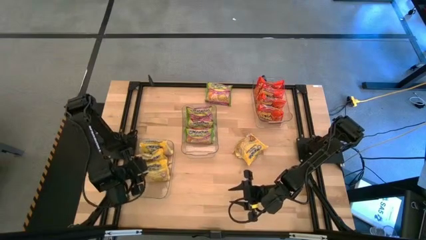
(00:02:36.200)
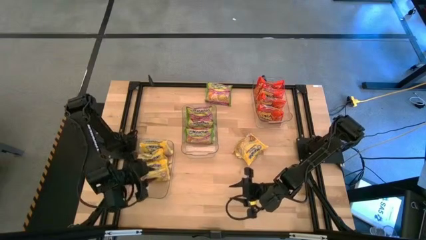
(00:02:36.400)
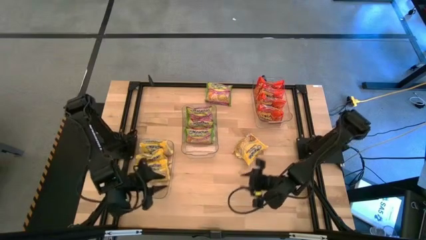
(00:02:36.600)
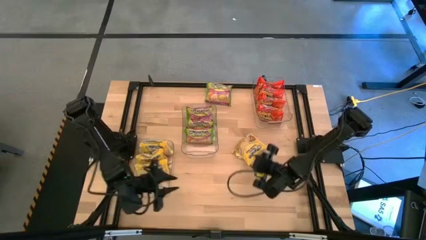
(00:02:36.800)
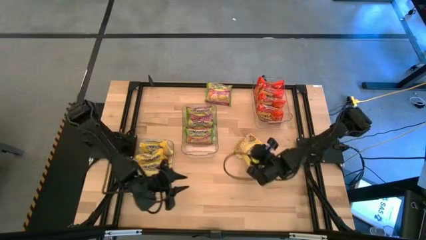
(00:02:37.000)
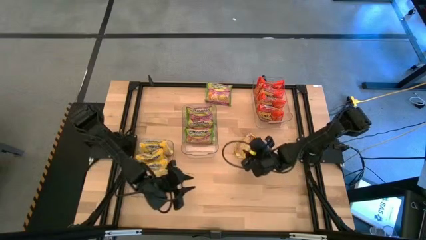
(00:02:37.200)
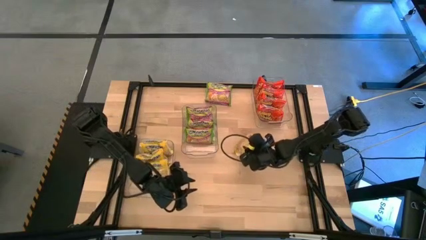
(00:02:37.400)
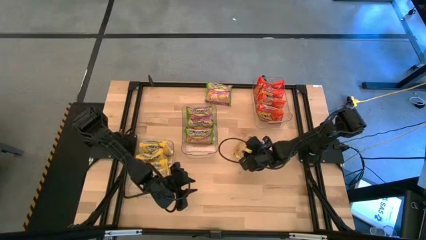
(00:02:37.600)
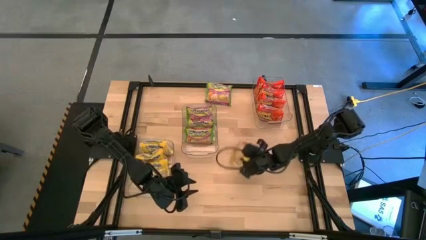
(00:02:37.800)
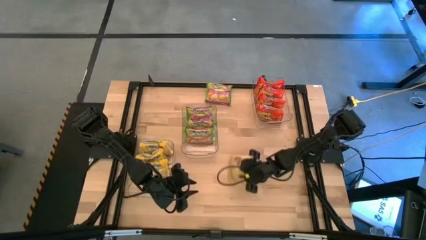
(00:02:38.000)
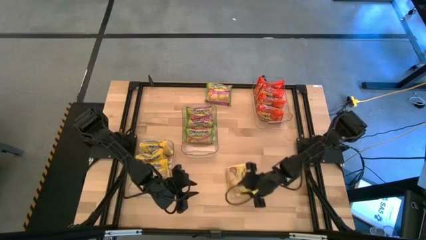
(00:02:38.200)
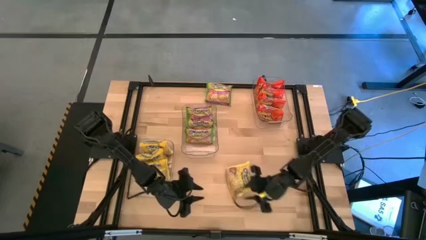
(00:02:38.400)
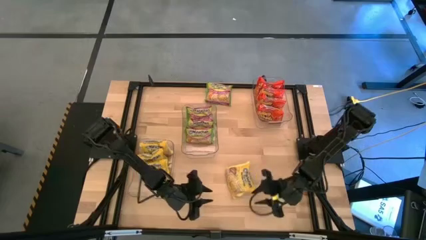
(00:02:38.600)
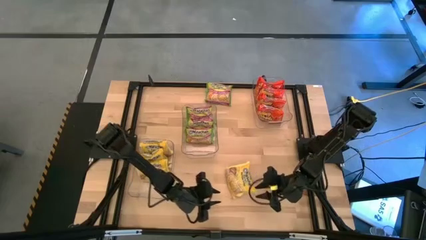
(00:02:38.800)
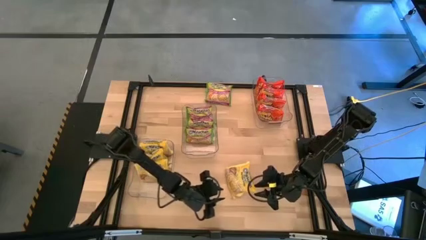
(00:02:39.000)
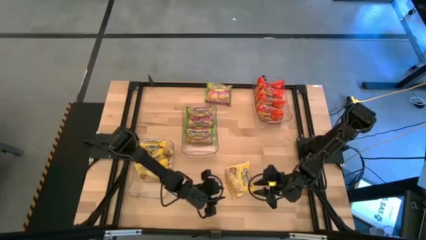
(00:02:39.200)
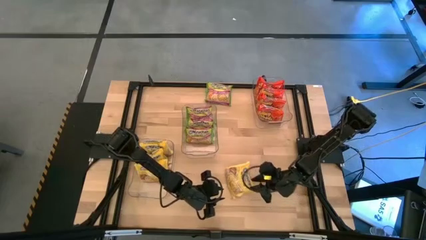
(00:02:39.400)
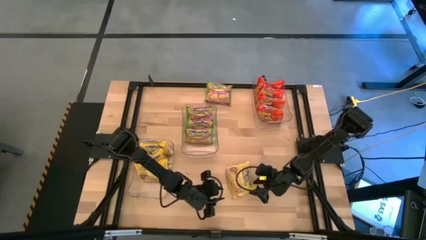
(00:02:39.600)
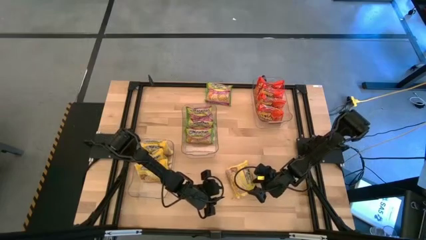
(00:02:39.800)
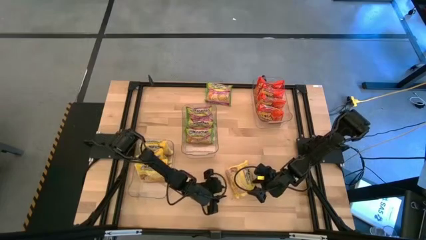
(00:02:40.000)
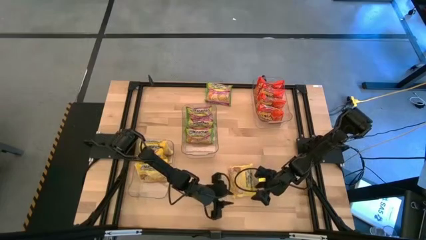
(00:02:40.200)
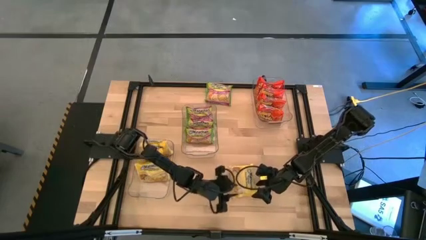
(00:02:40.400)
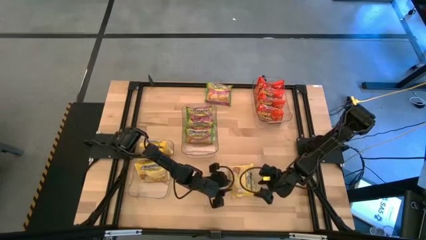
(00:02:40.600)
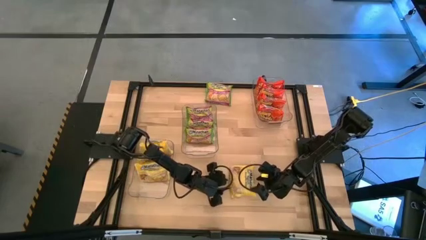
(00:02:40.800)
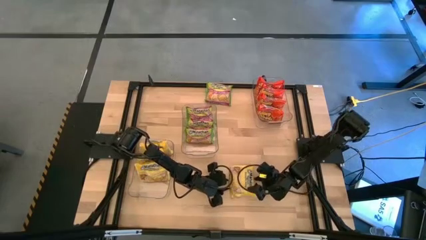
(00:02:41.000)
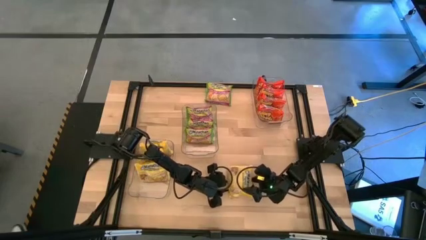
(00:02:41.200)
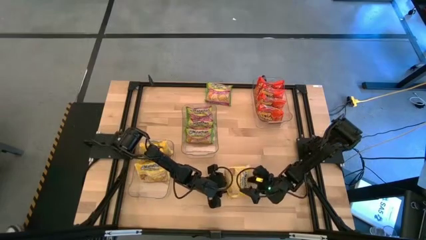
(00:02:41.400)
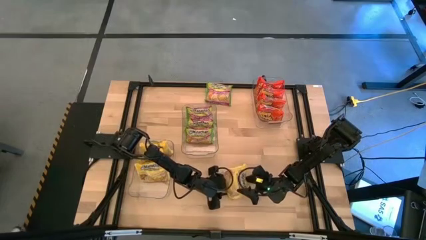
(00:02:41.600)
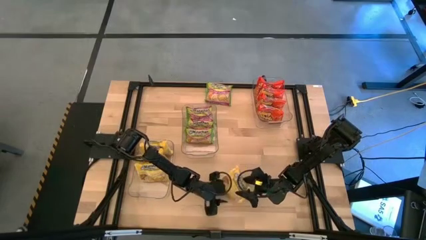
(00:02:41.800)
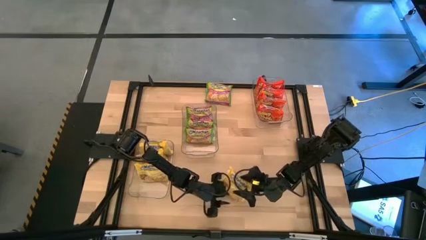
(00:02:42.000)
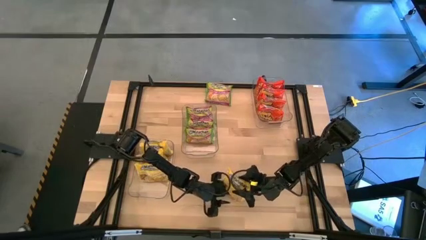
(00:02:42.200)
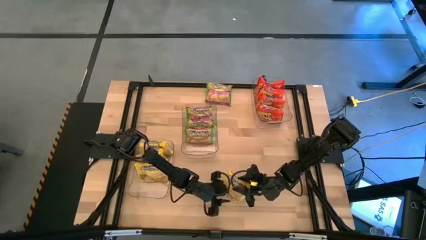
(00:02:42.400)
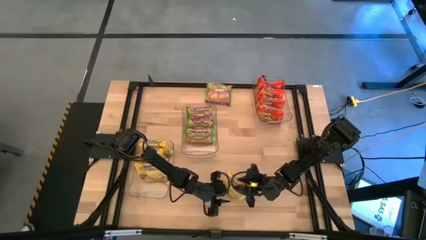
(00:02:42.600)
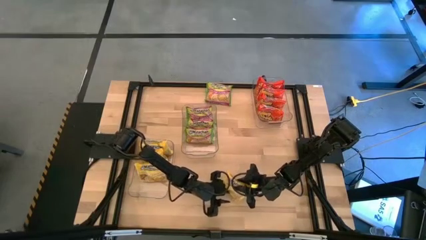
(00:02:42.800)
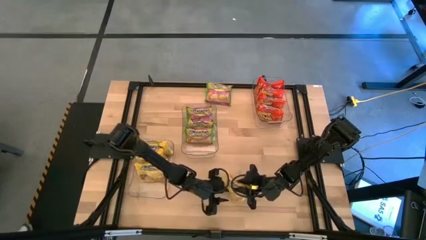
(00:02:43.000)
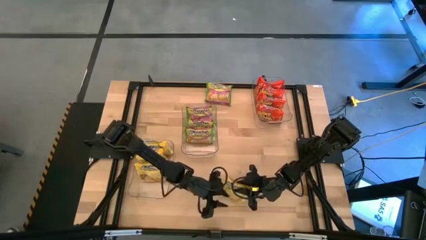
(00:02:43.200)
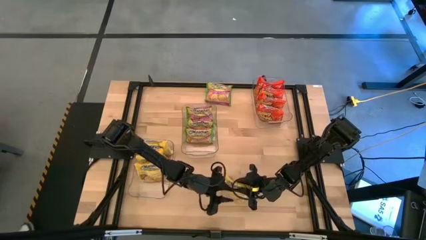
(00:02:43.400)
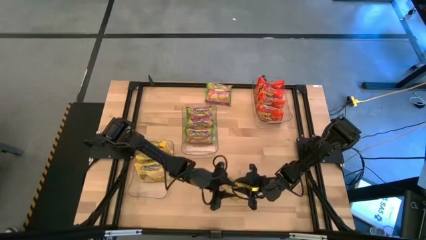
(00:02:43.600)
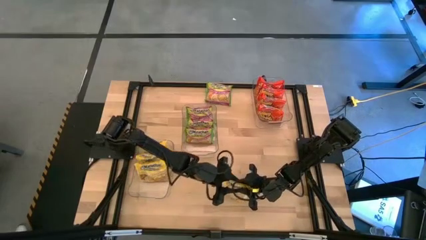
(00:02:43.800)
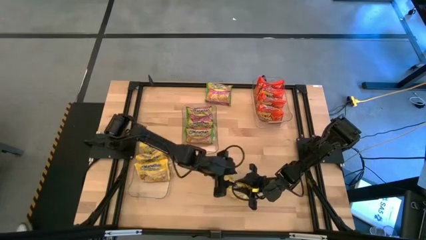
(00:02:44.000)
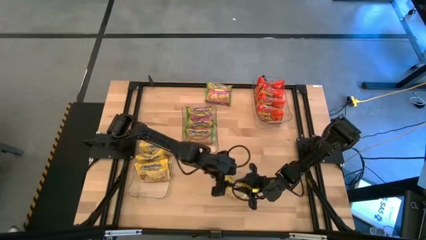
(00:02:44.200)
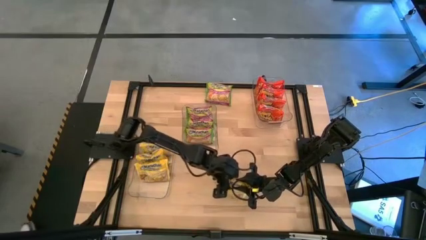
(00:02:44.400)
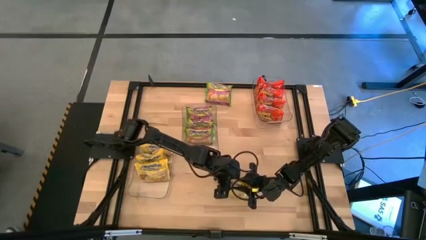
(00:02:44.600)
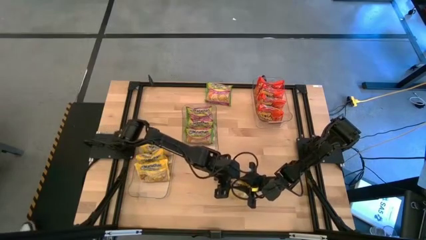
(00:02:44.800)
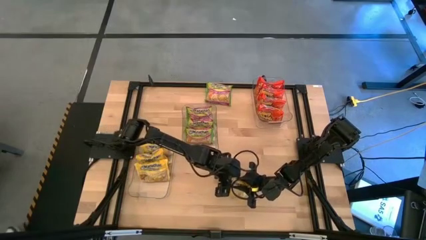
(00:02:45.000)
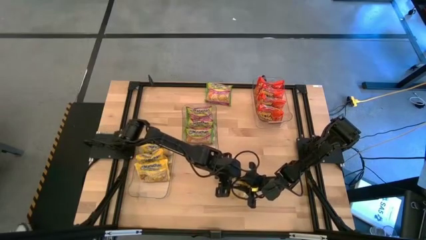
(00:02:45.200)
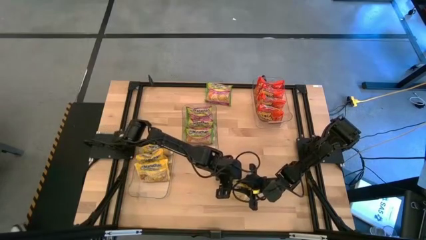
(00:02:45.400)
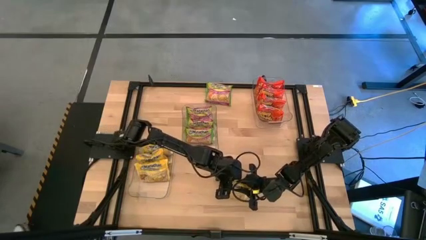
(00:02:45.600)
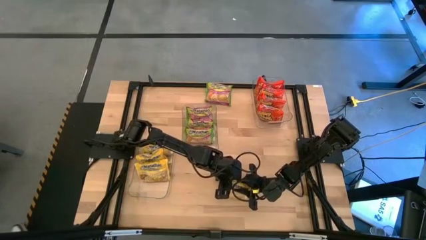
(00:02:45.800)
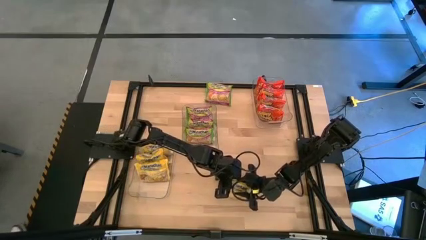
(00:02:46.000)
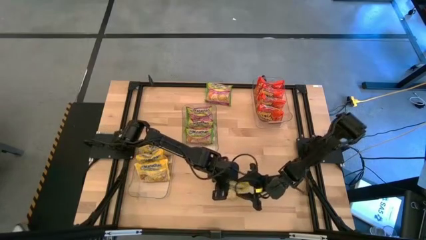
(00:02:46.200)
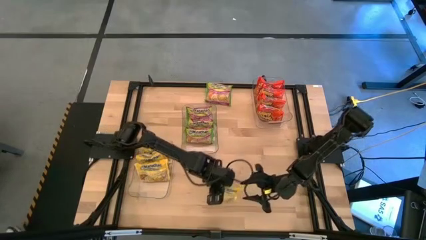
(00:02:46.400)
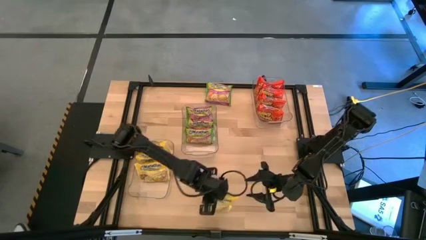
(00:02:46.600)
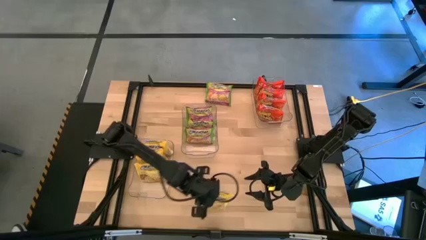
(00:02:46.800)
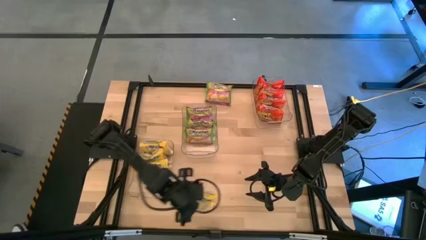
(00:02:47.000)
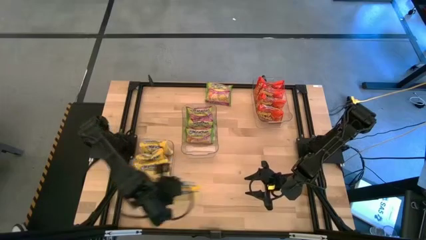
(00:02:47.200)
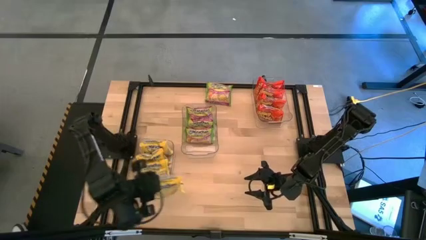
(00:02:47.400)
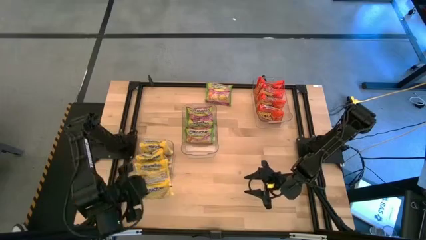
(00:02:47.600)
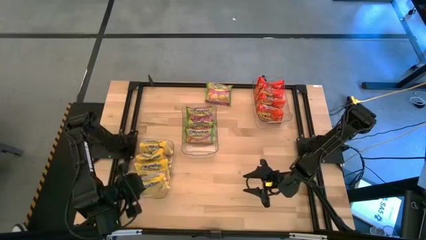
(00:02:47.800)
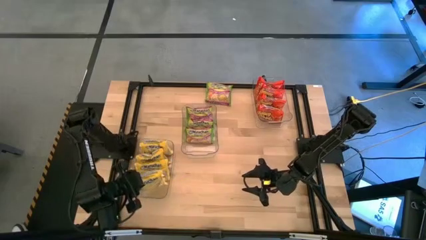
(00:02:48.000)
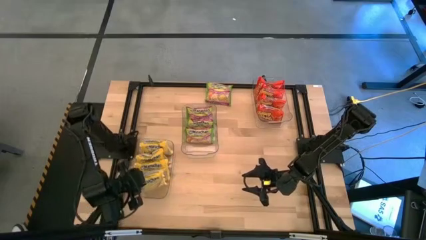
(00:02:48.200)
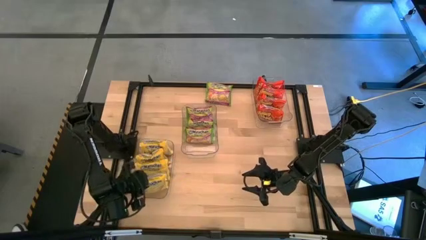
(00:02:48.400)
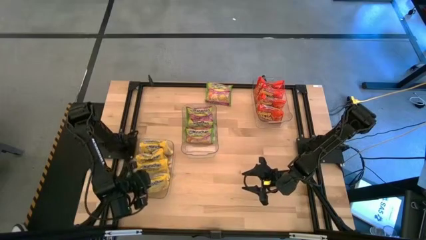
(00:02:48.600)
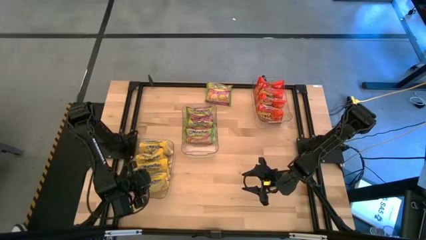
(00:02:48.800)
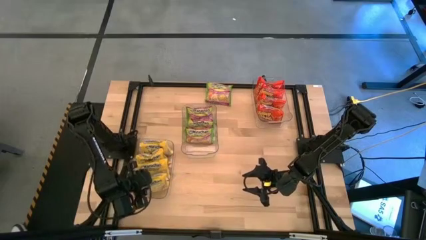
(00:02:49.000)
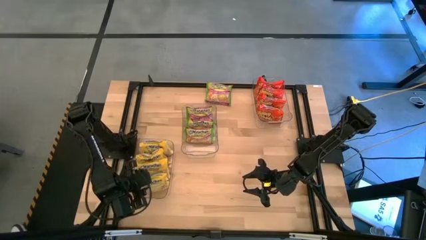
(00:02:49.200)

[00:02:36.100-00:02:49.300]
Task: Sort Maruchan noodles
Put the yellow noodle pack into the bottom left transparent bin
